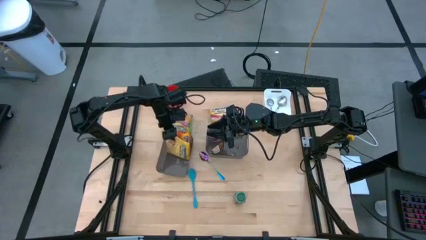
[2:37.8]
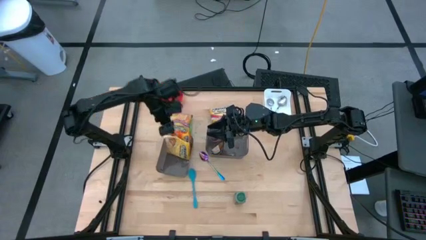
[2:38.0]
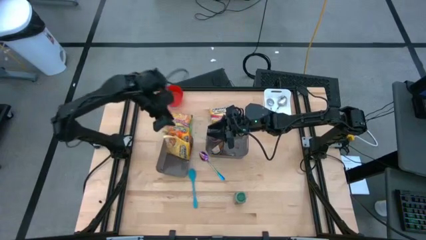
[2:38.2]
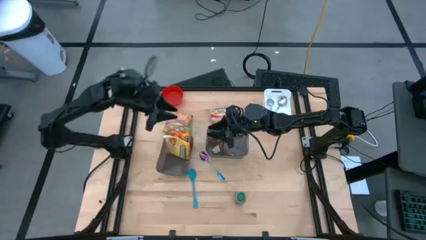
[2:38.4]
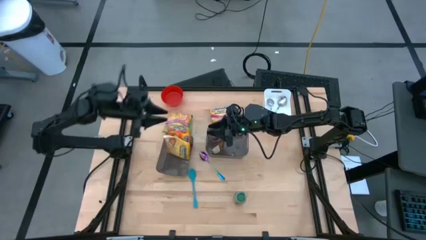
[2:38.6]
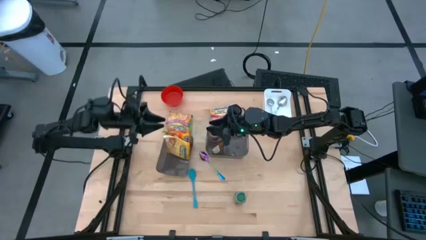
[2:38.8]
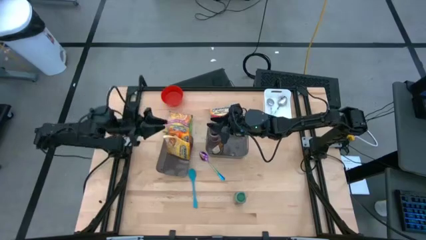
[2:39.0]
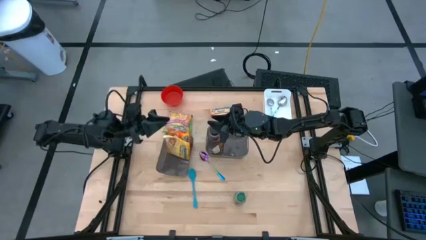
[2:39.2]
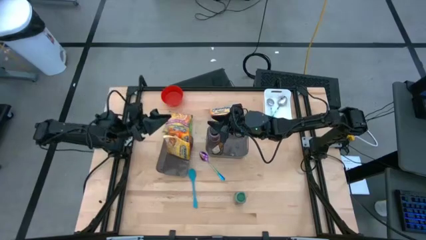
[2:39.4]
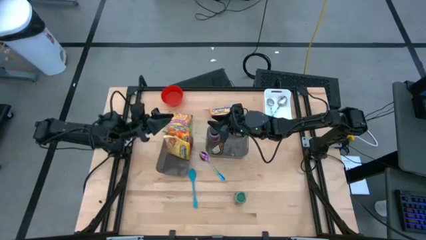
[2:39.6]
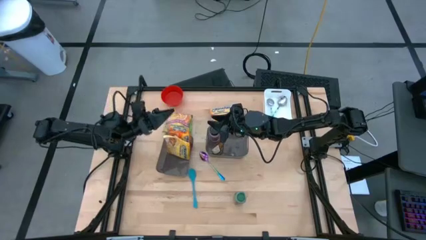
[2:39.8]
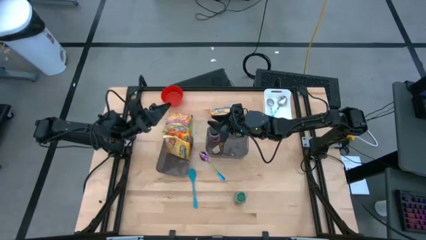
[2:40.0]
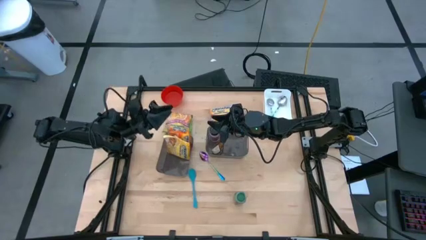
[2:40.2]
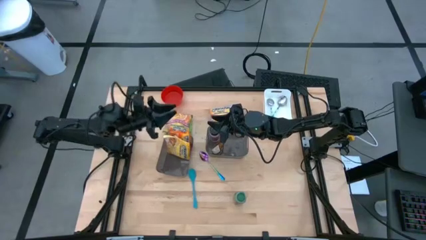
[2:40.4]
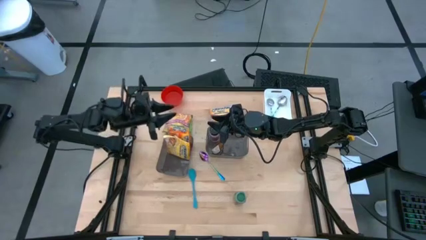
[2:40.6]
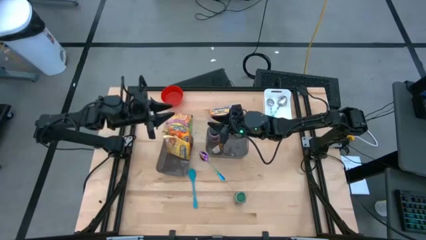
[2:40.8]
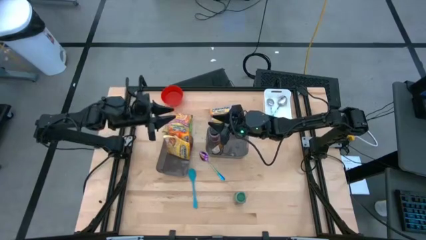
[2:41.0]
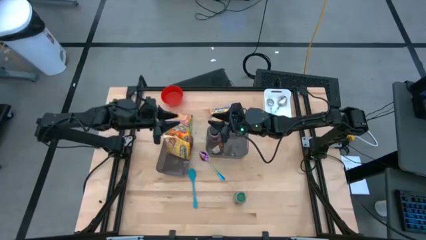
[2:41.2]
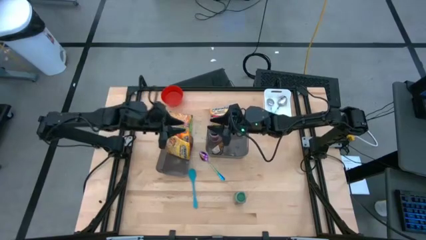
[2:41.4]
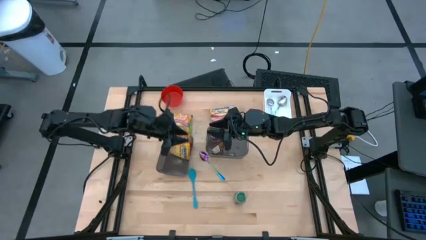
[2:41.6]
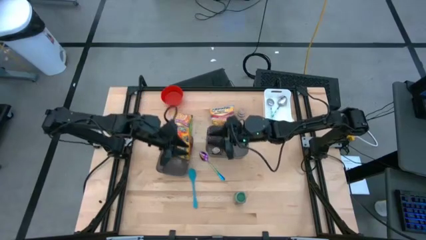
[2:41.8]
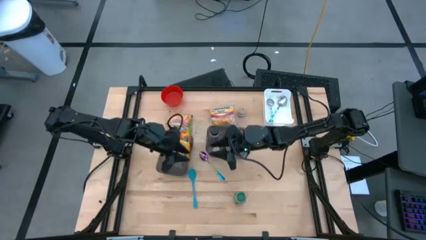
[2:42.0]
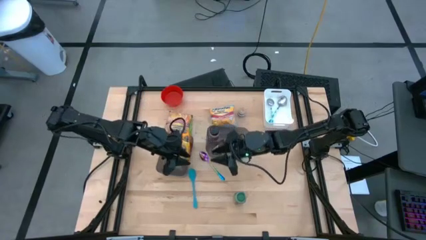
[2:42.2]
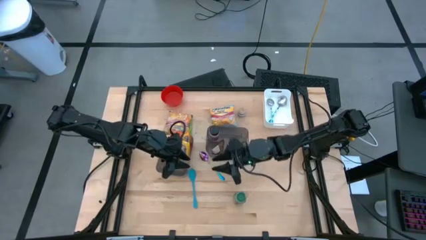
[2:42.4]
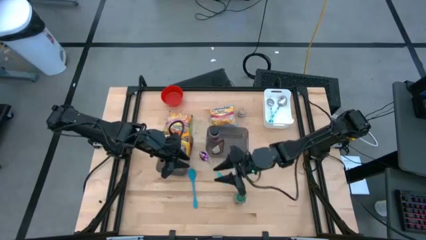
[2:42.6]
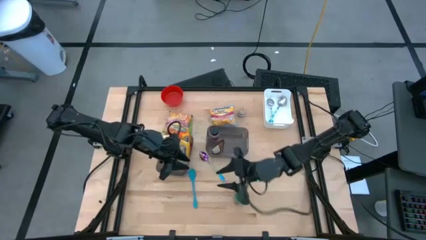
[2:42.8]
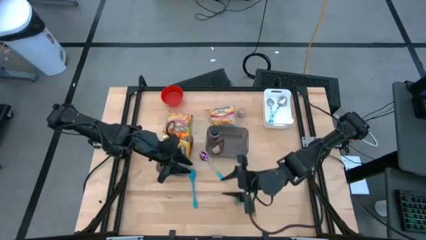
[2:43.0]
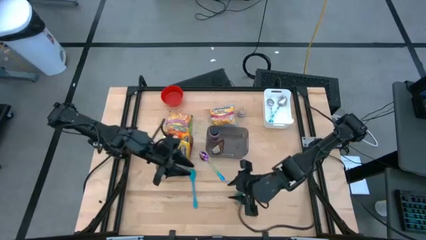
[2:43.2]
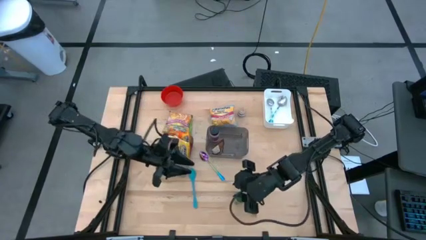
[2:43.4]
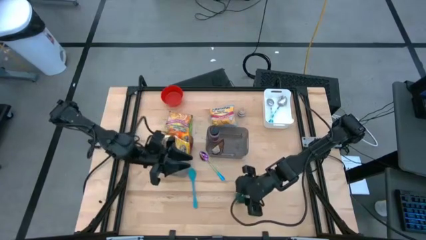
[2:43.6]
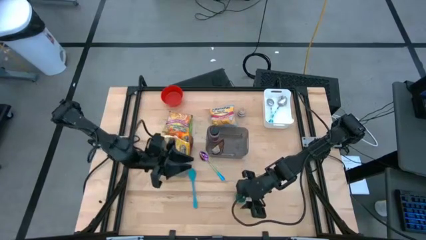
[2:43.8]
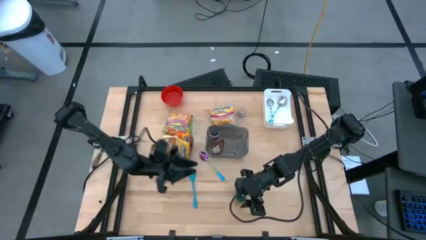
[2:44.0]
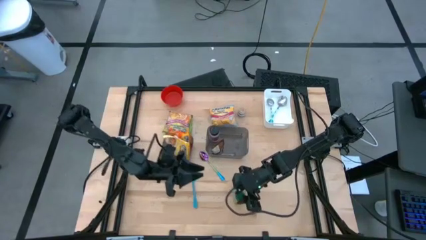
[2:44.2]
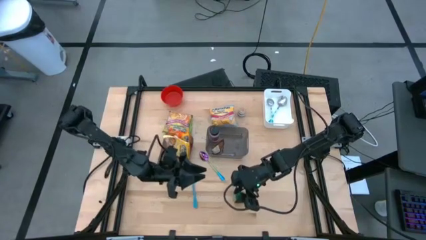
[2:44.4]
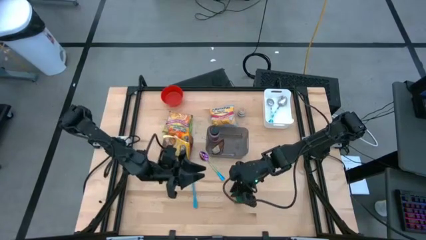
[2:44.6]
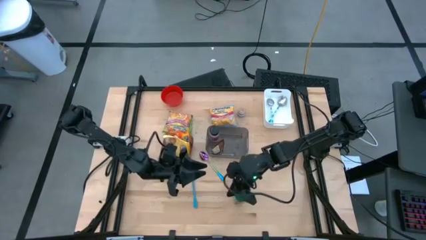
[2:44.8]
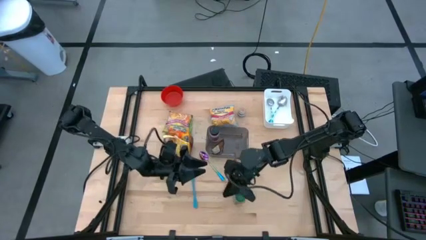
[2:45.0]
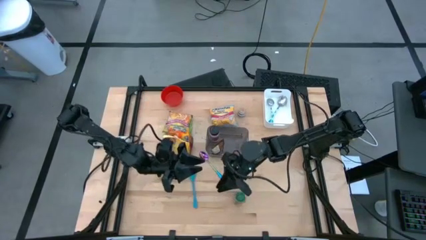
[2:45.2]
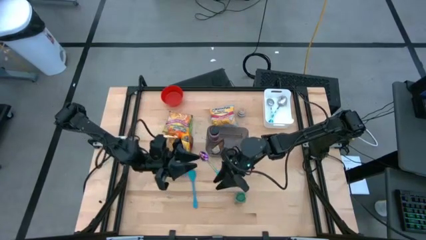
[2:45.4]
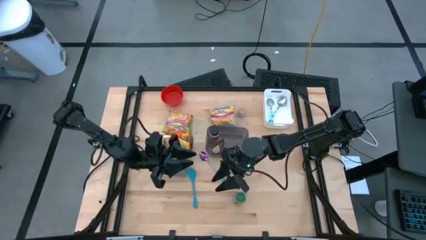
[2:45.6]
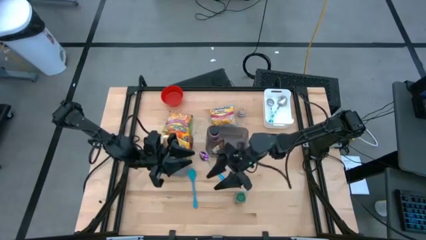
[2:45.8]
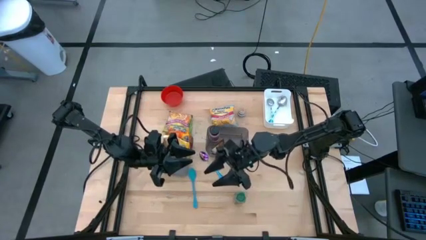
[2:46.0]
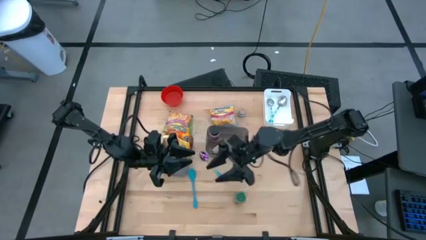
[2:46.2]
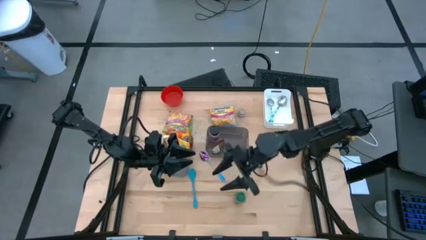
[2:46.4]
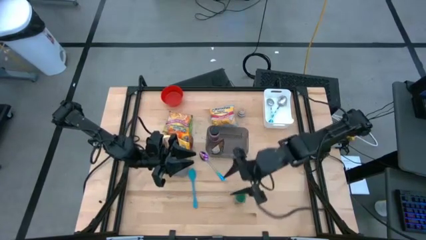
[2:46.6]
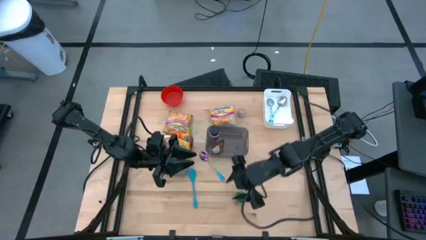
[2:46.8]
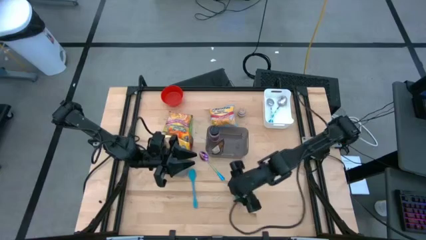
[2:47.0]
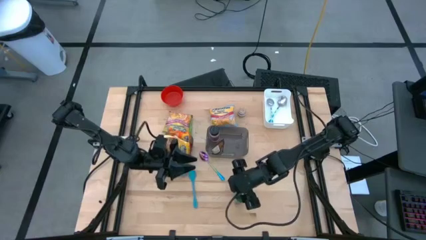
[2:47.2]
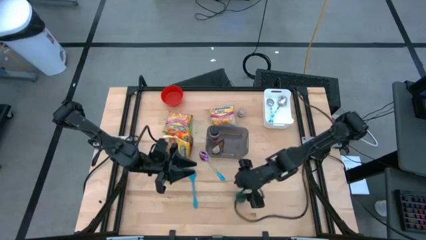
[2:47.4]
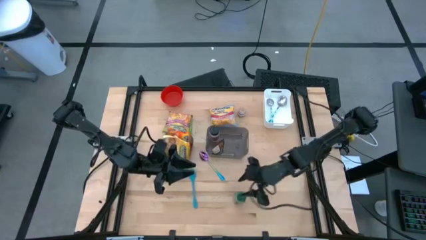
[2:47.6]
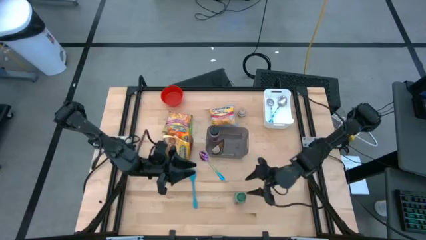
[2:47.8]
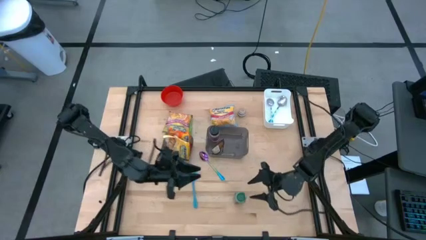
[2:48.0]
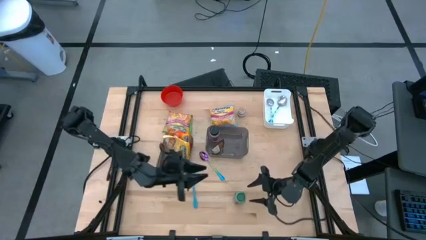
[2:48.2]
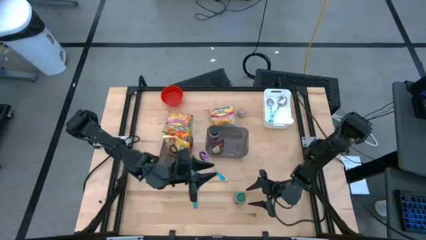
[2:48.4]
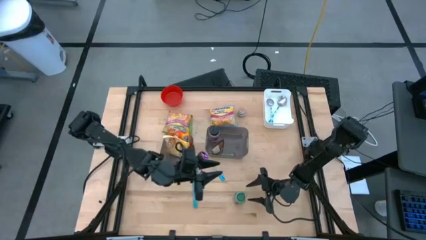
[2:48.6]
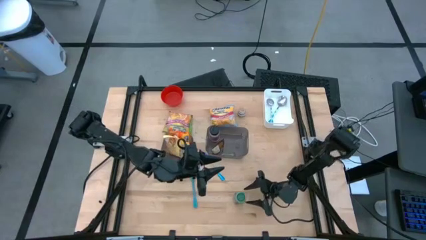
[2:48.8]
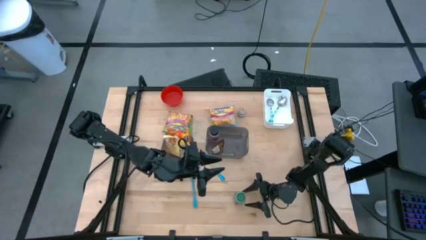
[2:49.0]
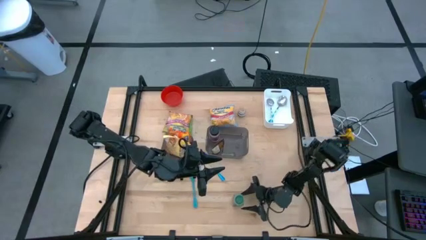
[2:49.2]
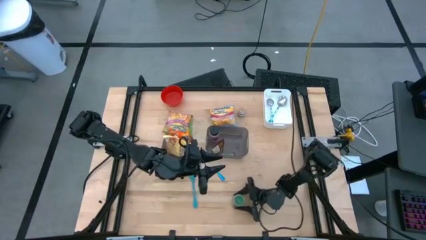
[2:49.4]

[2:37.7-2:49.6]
Task: Pick & Place Food Item
Put the green spice bottle into the right black bin
